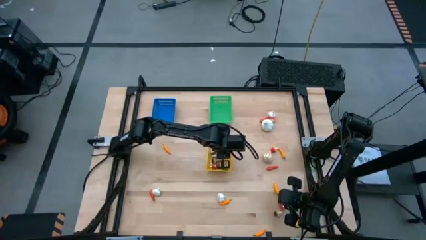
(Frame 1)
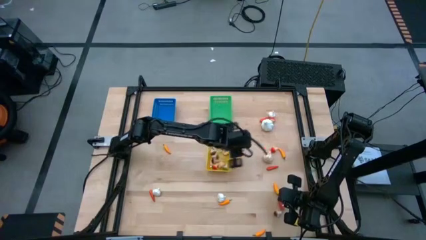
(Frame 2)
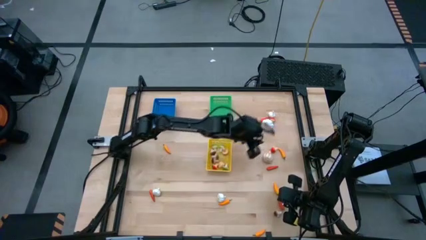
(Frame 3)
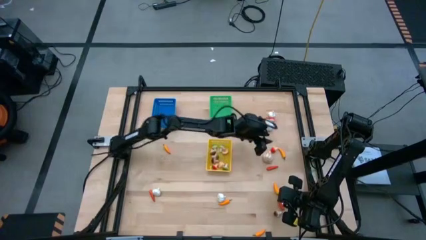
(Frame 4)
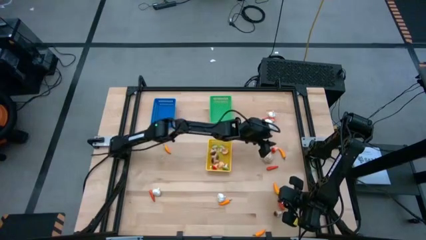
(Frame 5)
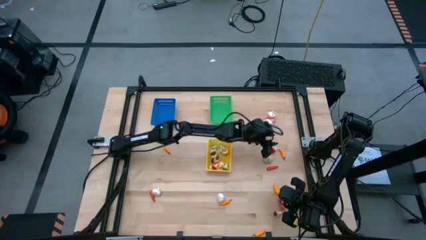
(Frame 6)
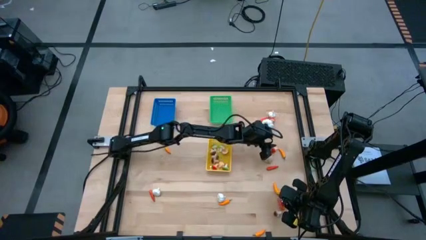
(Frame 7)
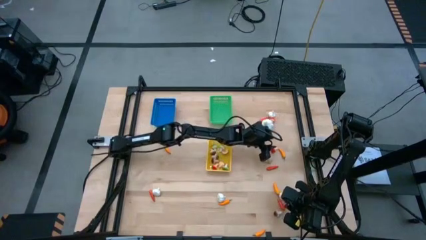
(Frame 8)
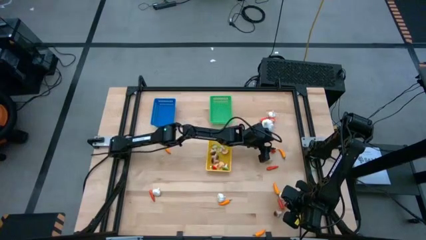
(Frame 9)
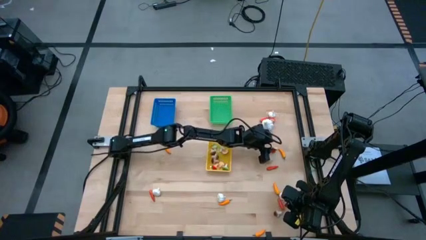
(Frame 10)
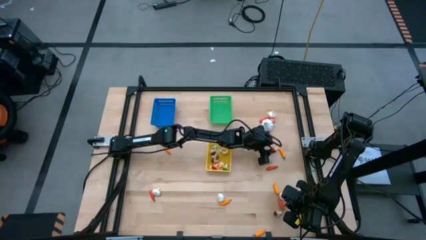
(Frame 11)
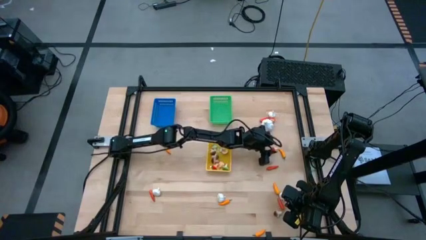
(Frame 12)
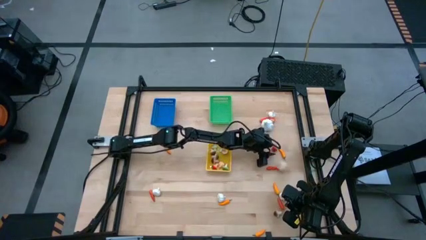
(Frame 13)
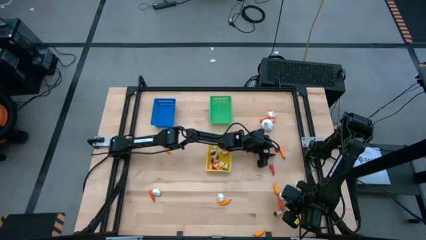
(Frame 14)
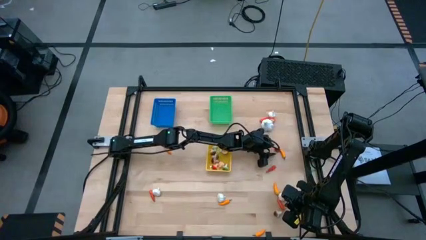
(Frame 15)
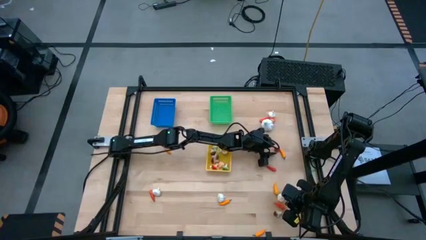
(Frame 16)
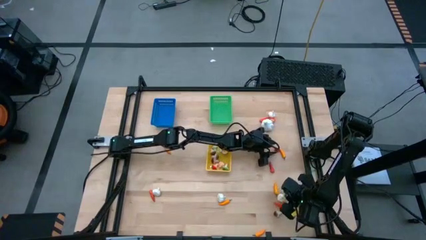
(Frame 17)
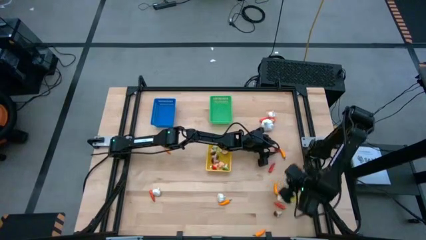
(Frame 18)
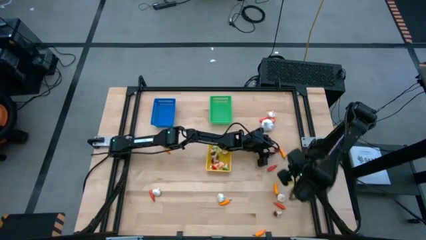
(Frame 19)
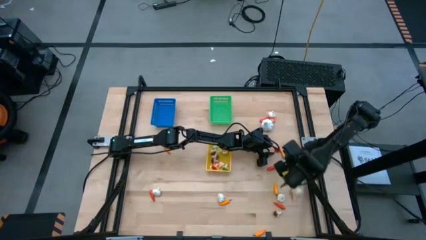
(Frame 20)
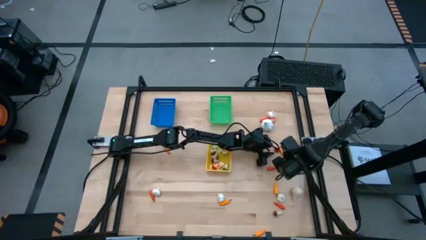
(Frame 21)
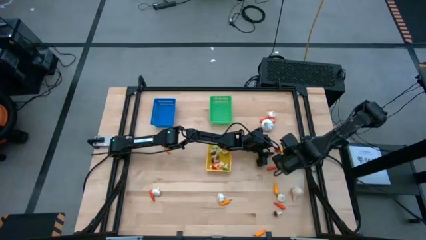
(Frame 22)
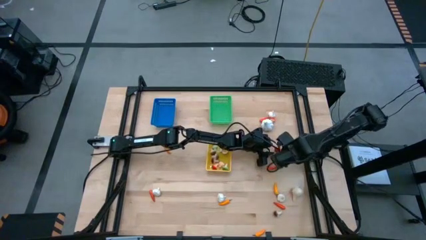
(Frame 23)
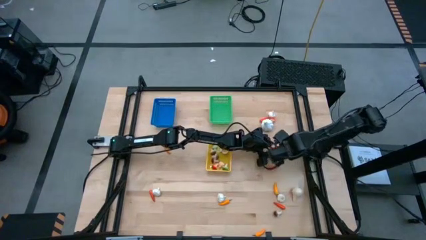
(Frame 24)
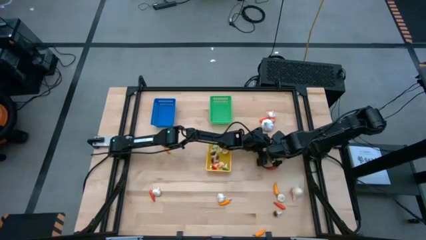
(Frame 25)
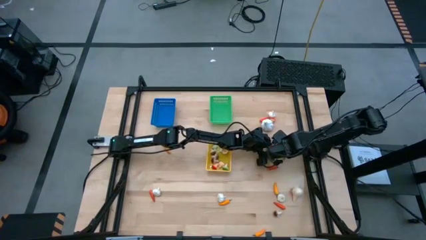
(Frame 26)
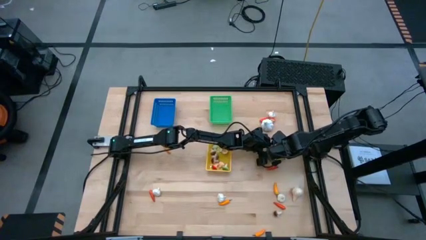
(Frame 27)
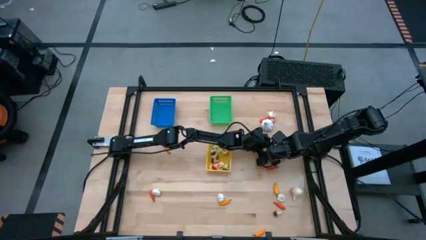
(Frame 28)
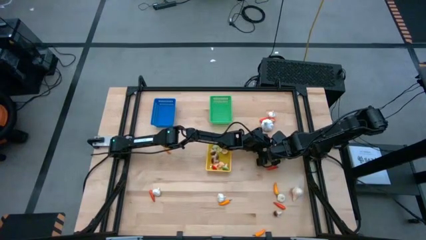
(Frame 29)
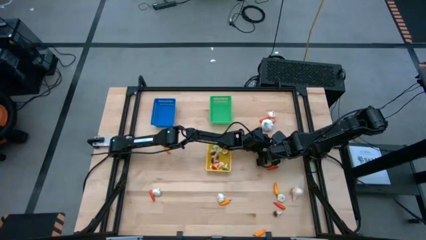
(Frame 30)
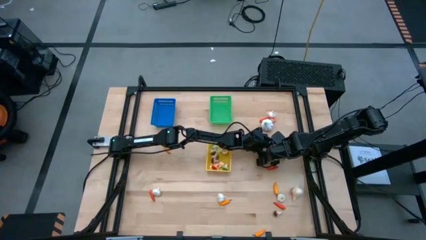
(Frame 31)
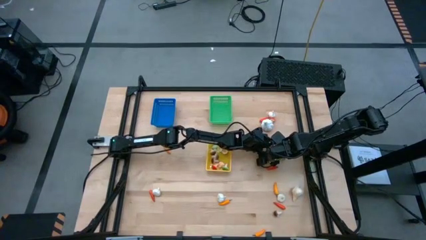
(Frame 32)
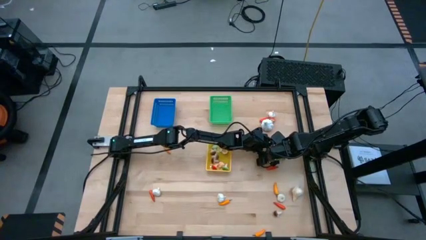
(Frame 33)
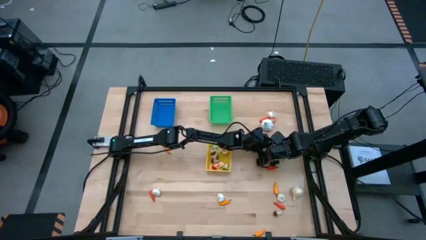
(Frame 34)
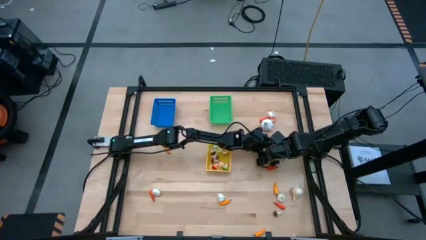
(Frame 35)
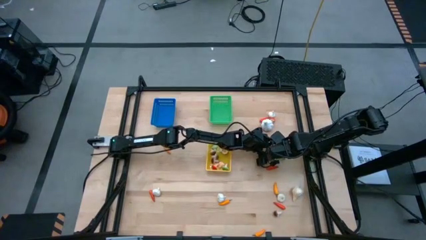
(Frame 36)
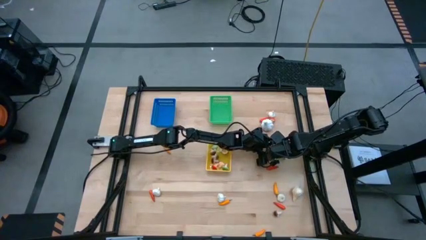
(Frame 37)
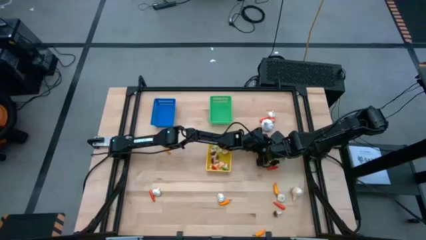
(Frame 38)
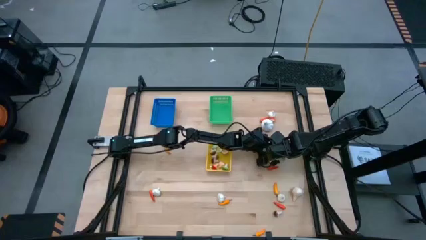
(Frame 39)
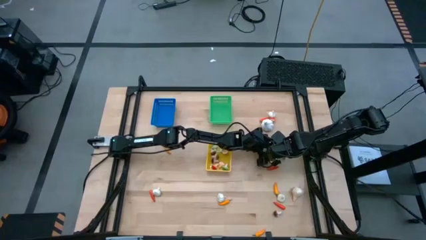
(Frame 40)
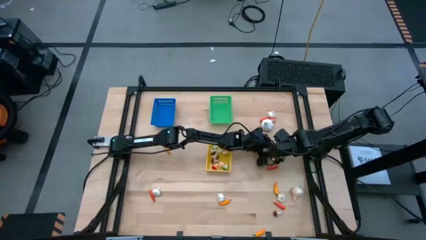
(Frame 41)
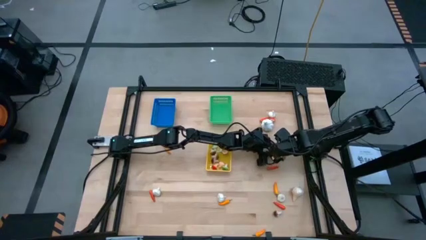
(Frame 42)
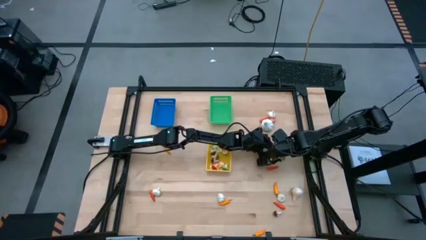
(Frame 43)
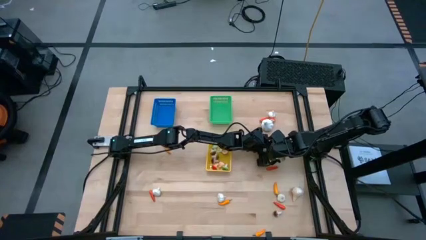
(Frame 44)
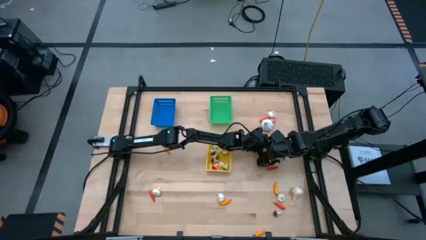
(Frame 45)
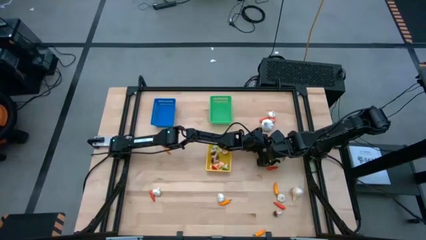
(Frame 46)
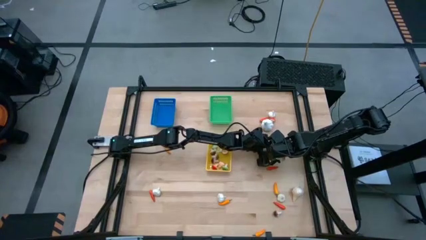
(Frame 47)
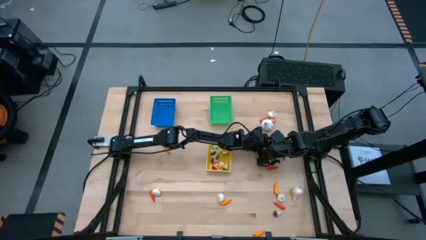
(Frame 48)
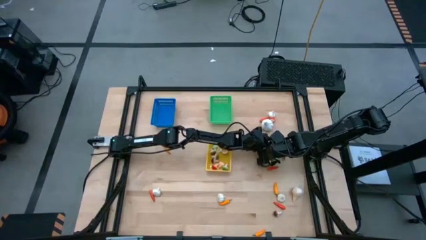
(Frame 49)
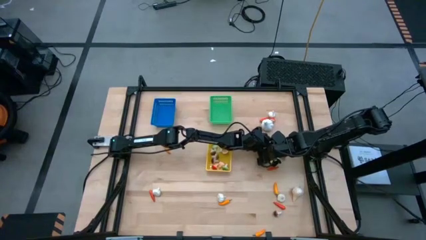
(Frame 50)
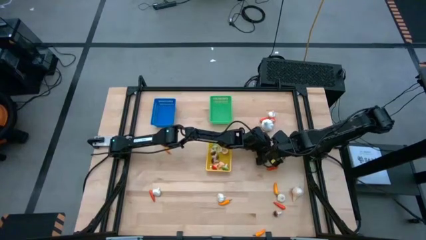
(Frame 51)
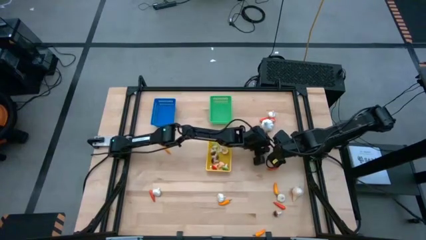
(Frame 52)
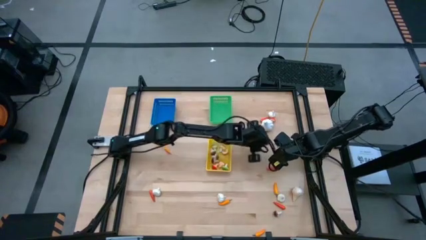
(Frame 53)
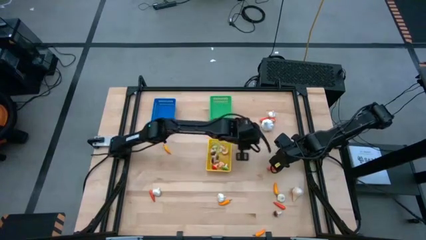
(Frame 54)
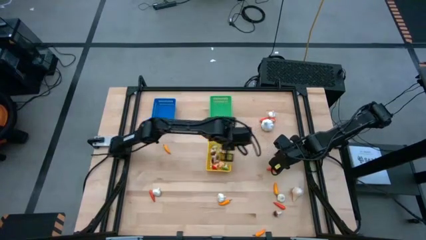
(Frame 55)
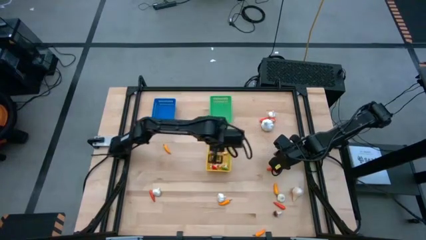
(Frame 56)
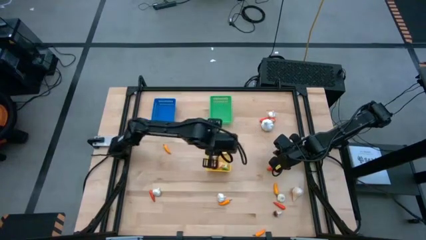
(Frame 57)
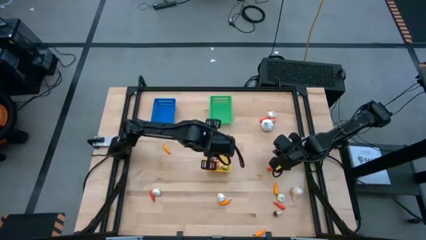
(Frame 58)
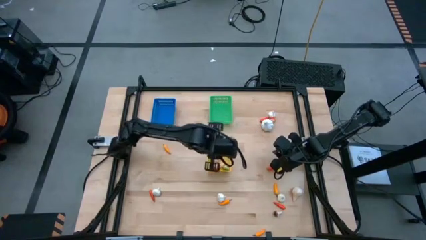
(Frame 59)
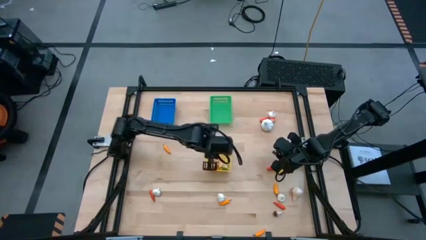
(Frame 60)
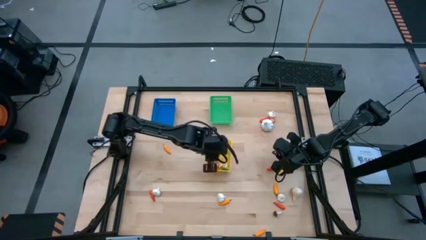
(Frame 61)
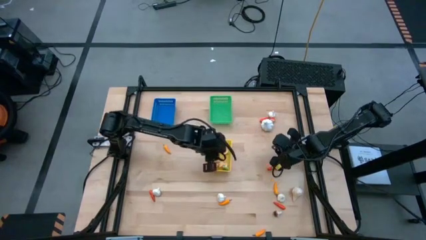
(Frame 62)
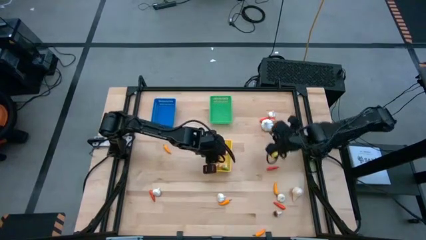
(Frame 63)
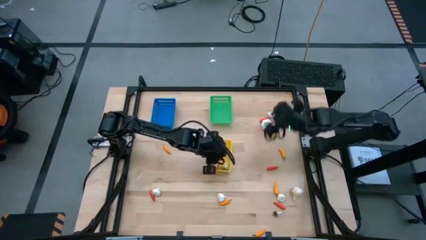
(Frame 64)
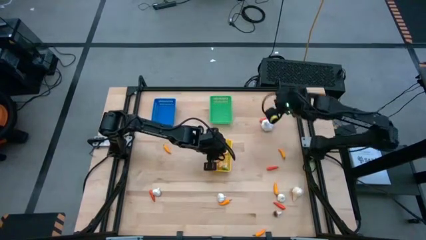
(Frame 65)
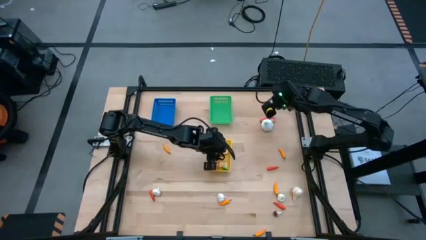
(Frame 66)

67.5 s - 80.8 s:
Task: Sort produce into baskets
Put the red mushroom into the yellow bin

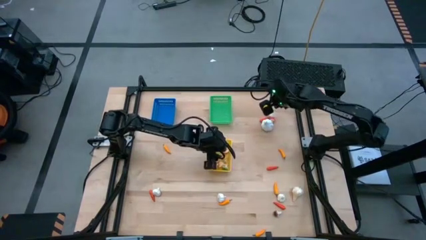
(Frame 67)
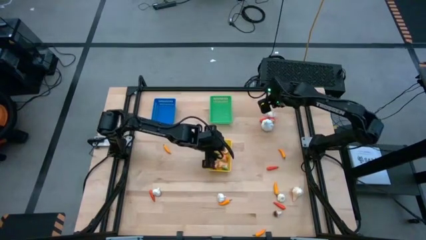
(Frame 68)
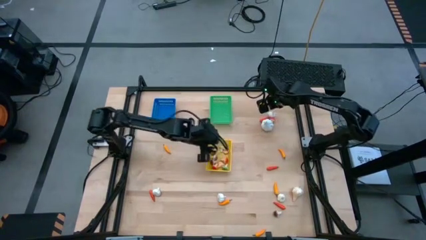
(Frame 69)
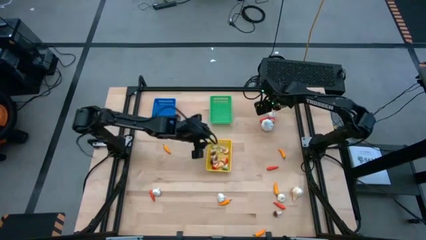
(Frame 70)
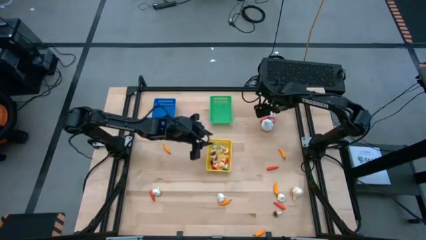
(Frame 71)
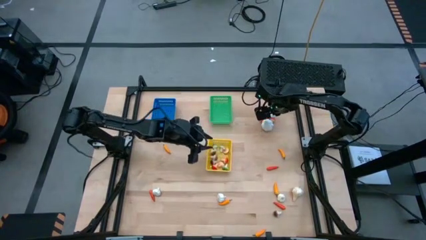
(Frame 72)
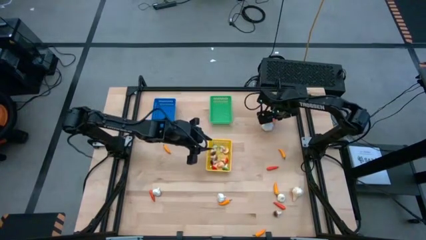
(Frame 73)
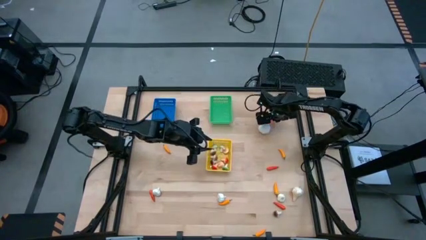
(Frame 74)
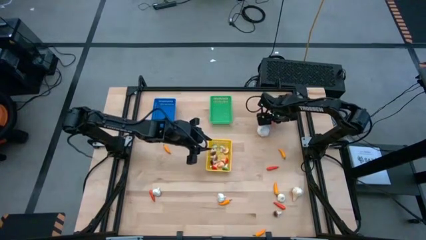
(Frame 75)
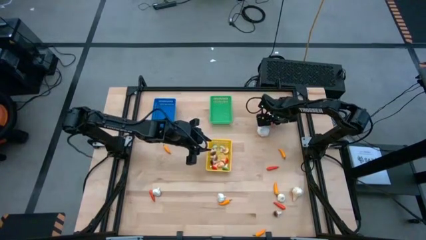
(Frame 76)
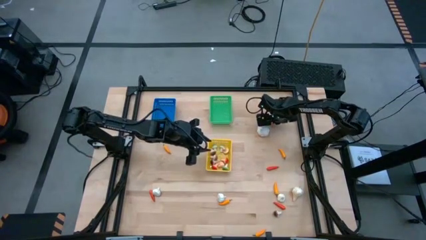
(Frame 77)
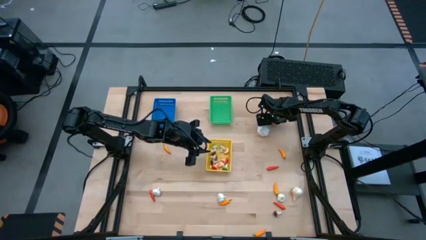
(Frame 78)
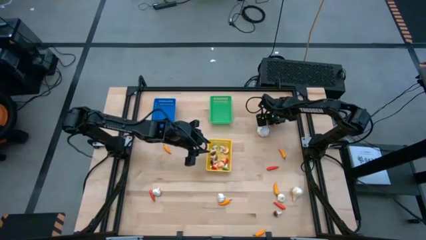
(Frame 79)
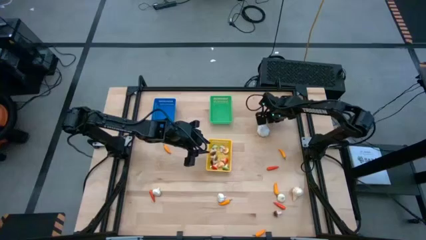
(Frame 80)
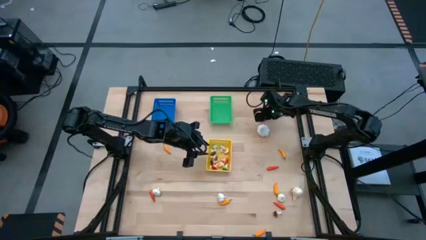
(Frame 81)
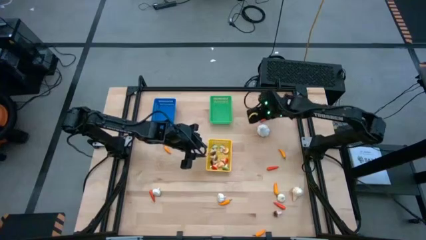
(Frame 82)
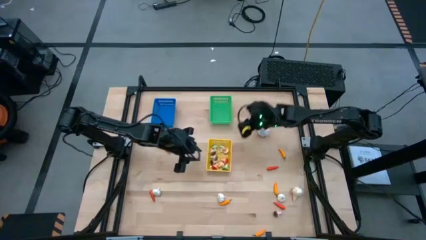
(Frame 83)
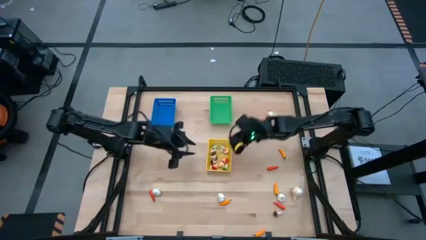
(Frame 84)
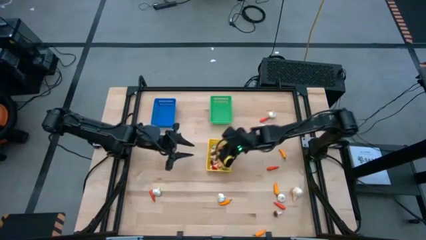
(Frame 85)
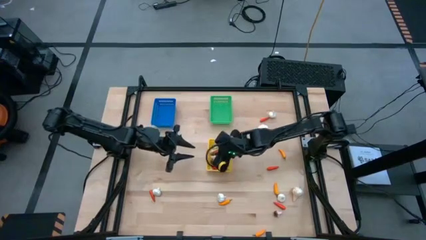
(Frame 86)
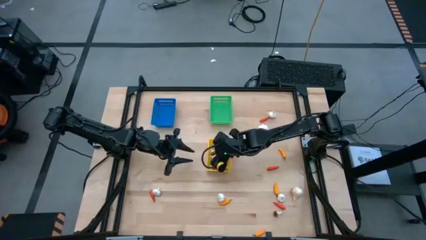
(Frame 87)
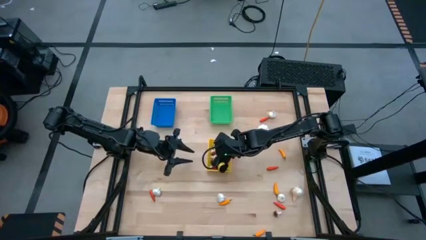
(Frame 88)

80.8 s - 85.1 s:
Put the red mushroom into the yellow bin
